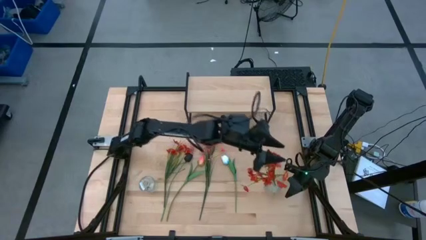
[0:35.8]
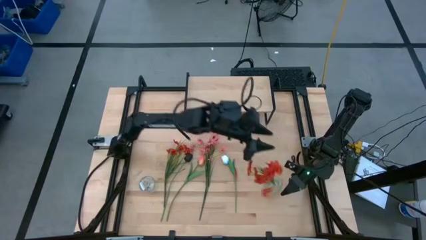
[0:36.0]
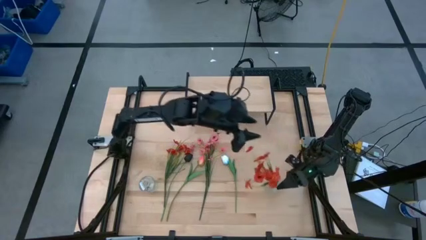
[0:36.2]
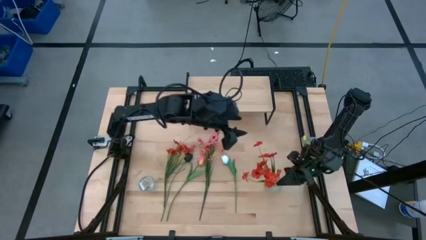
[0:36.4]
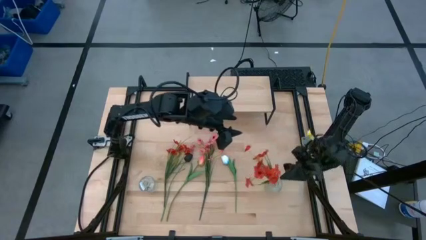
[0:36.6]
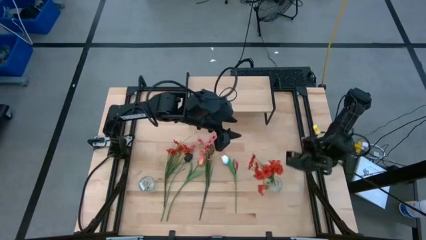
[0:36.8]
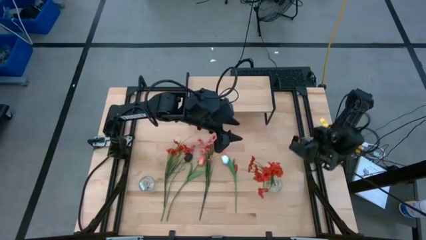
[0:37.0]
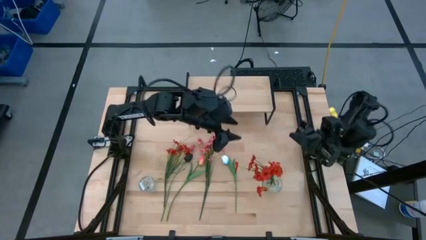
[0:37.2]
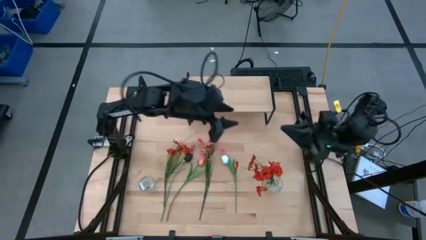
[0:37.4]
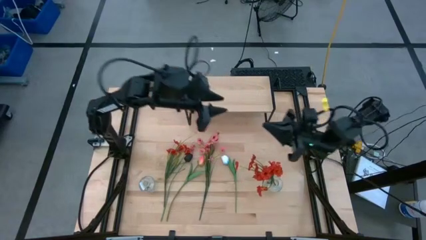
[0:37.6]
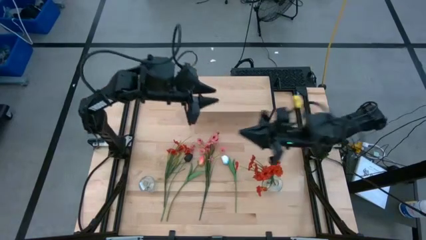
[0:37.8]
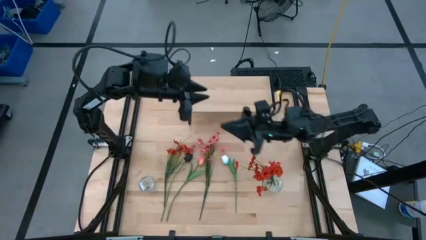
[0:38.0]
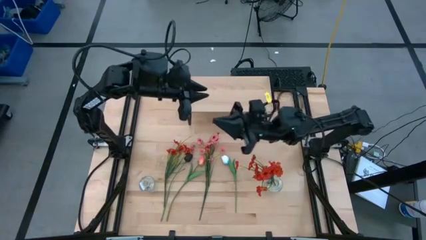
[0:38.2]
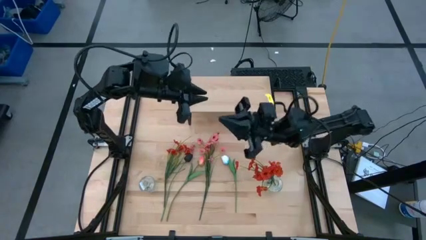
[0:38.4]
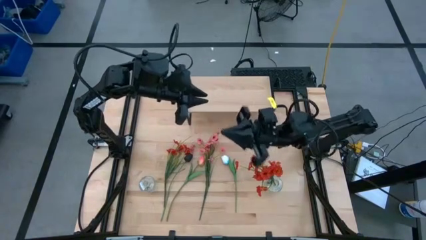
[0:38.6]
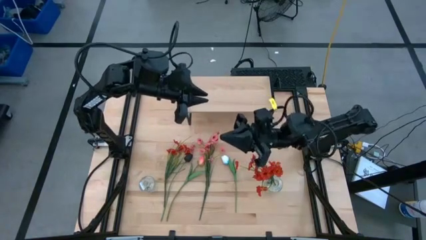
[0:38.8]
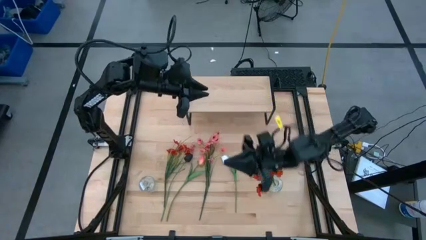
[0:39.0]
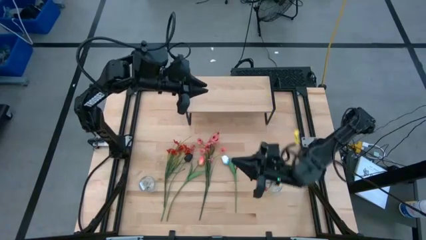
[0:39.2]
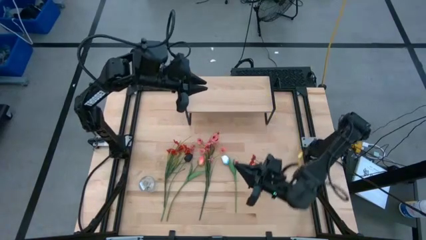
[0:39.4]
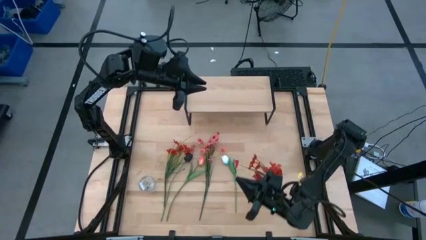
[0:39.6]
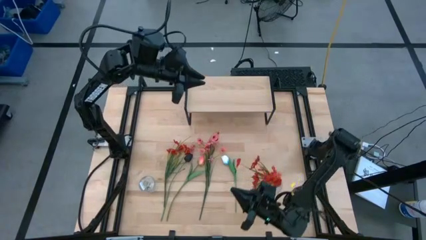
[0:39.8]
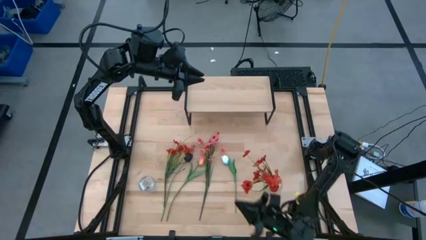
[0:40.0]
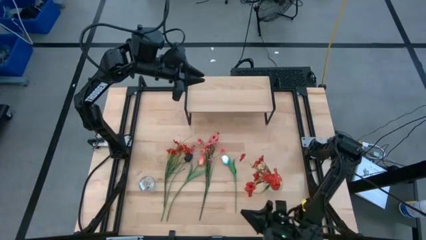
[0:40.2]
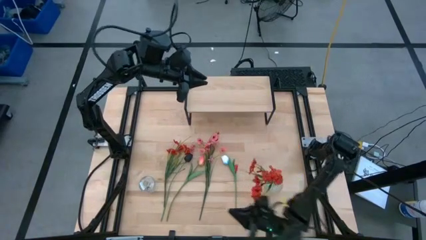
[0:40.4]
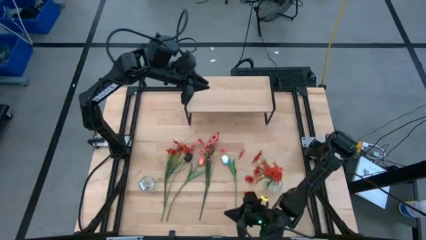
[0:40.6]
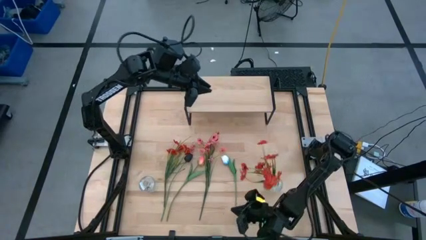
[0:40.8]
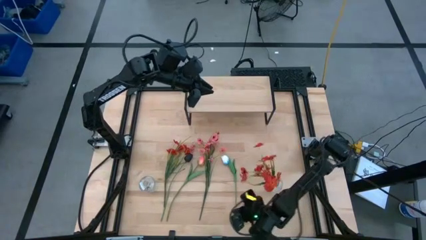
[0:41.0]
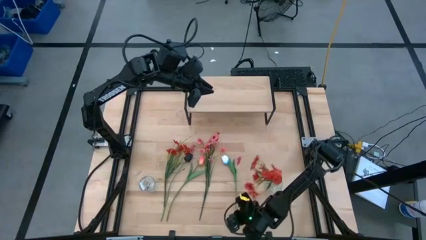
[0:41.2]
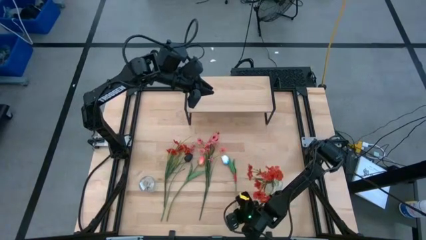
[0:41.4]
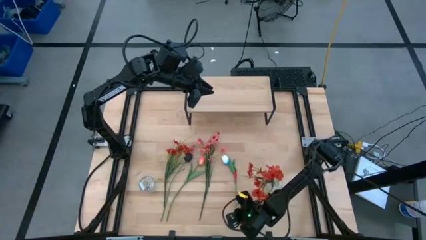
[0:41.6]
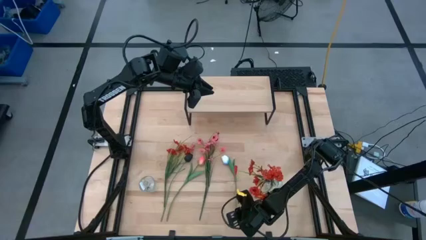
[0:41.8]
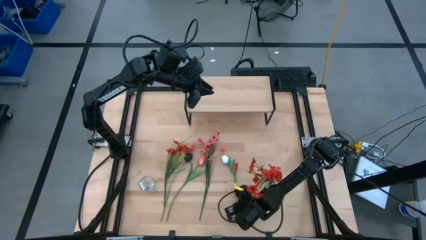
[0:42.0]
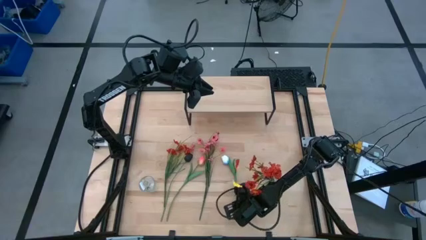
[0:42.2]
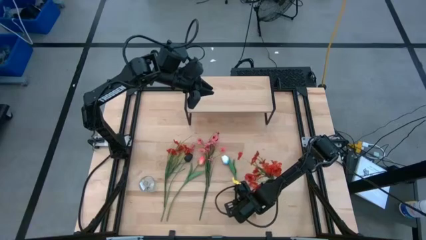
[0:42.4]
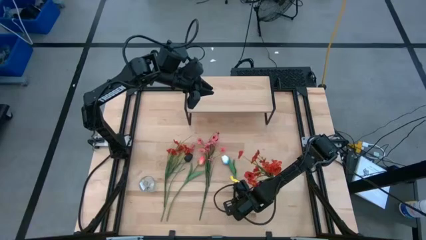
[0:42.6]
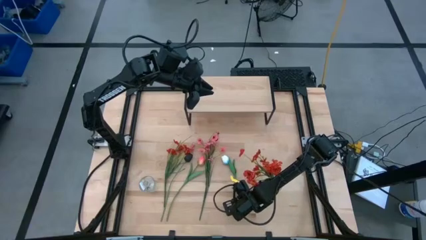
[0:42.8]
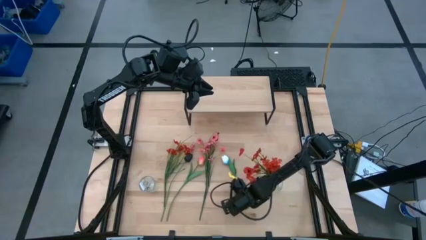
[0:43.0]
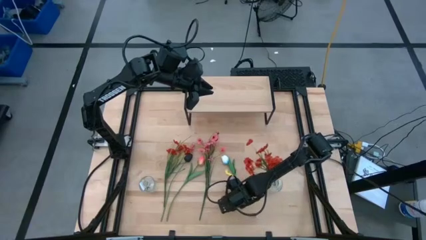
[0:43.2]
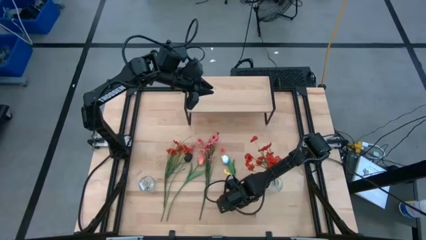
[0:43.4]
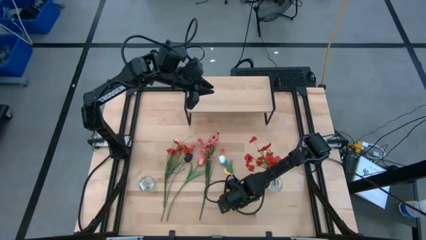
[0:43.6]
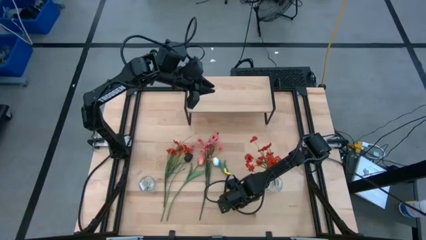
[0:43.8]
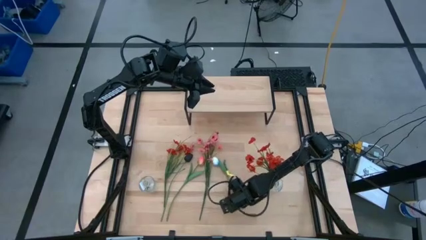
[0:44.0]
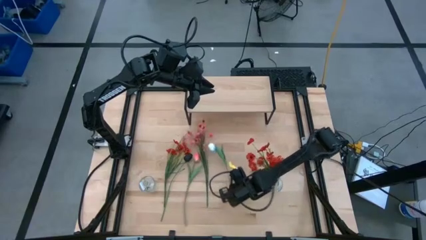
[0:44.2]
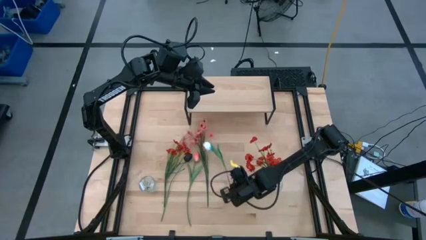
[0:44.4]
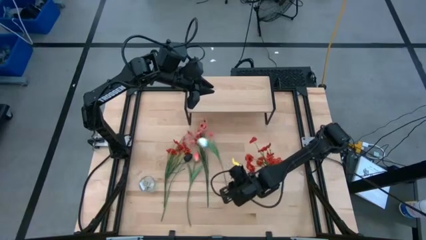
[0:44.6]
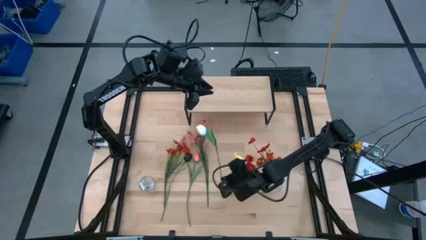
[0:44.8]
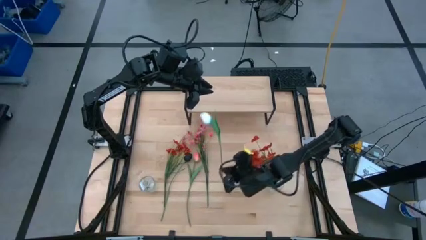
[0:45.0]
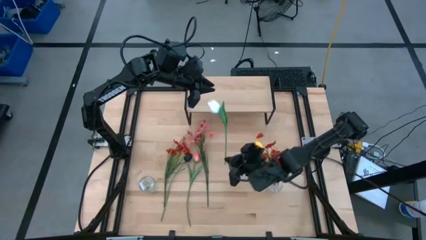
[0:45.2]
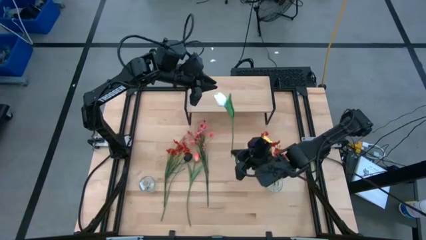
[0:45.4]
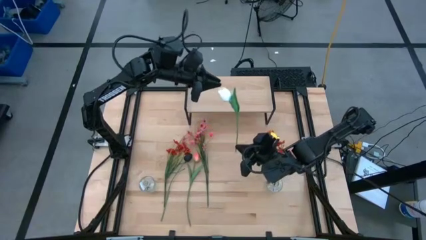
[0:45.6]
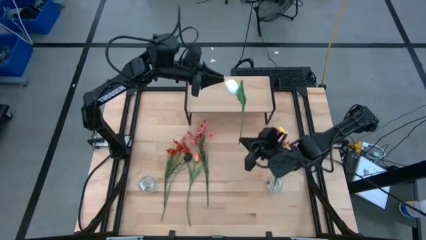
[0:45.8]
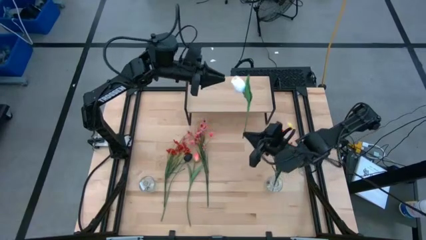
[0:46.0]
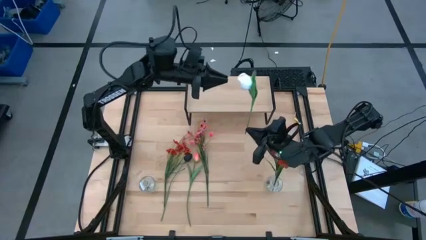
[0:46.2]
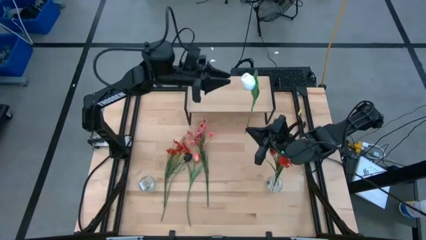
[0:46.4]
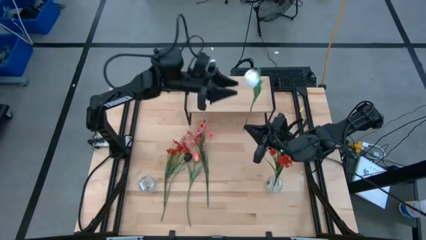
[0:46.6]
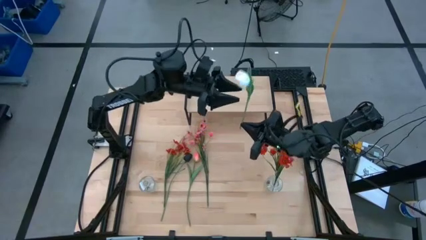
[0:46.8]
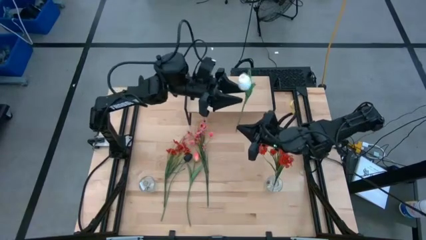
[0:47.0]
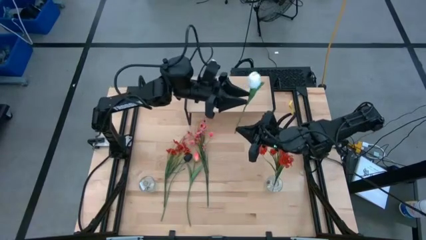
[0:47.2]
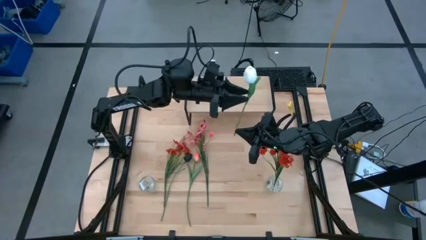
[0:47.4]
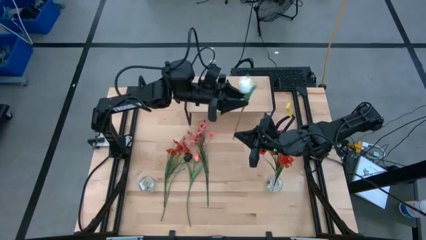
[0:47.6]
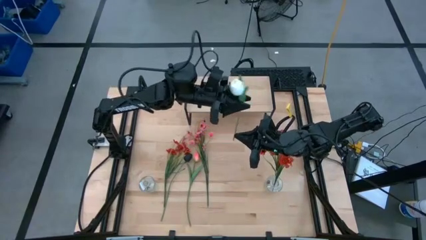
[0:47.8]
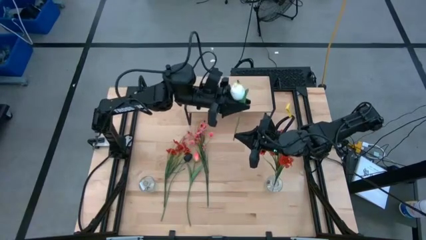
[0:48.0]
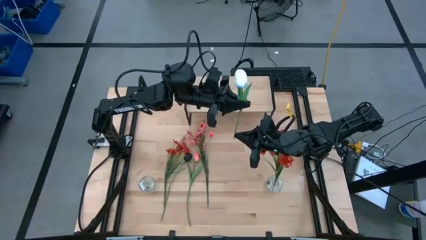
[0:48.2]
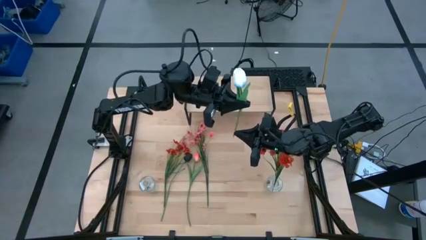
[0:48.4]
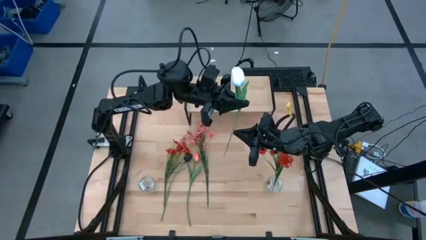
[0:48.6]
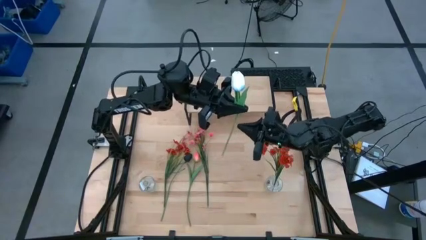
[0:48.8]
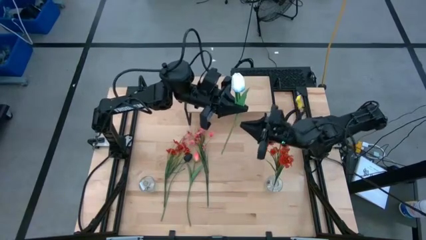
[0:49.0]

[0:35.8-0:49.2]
Task: Pick and place flowers into a vace then onto a shelf
Put the white flower into the right transparent vase

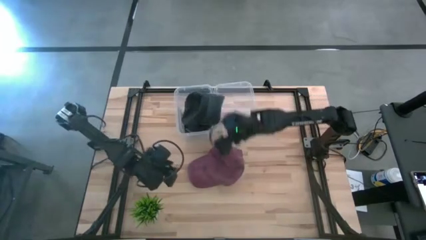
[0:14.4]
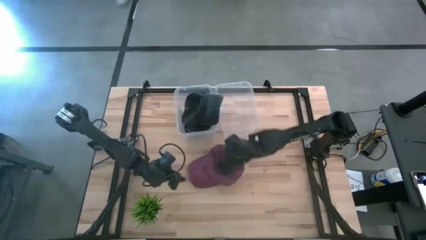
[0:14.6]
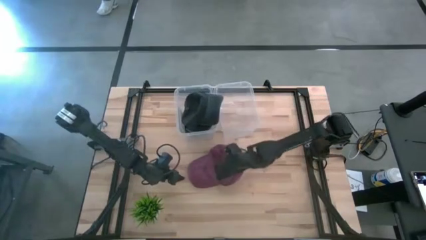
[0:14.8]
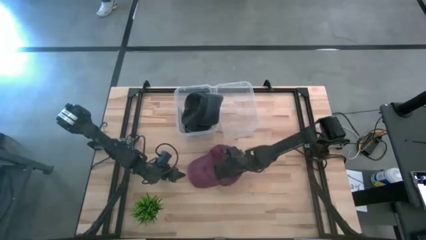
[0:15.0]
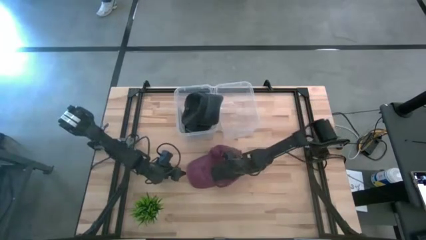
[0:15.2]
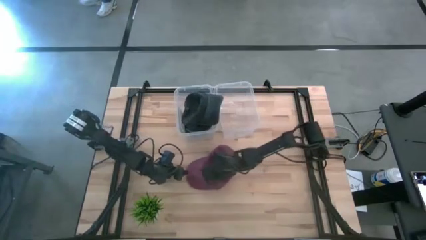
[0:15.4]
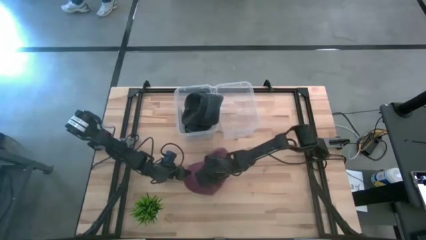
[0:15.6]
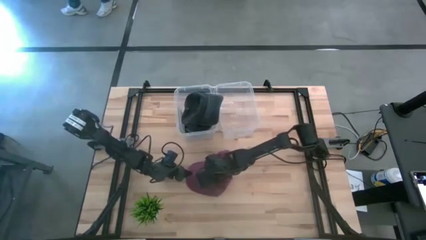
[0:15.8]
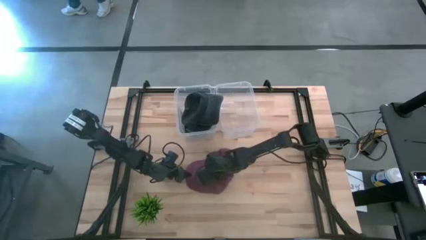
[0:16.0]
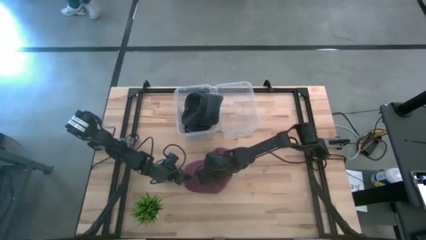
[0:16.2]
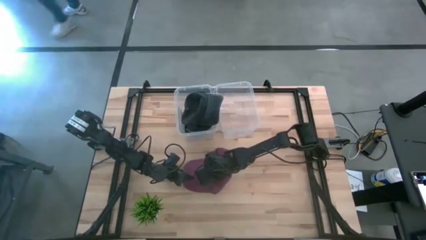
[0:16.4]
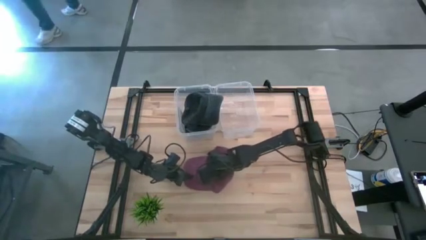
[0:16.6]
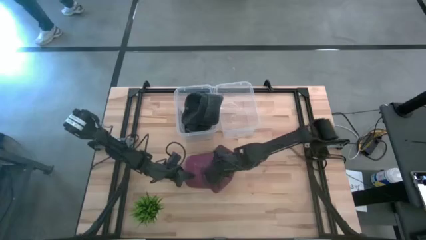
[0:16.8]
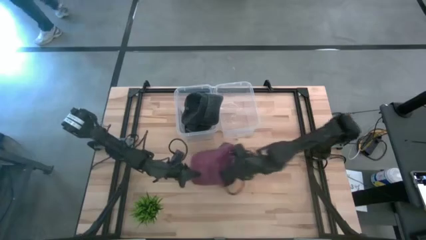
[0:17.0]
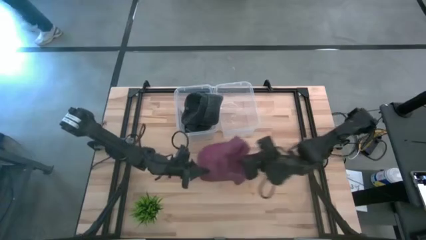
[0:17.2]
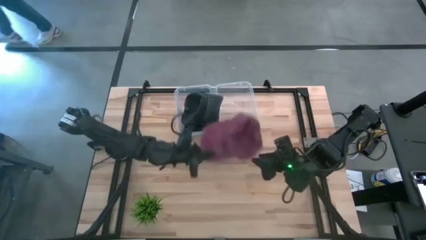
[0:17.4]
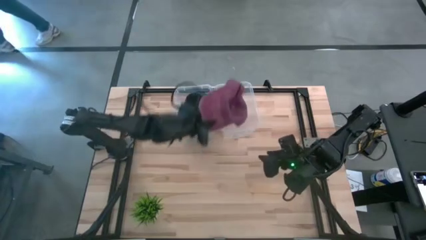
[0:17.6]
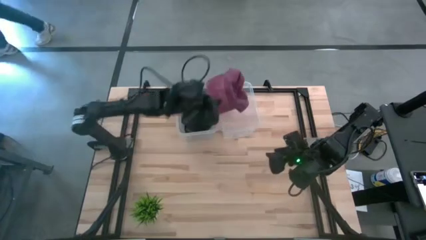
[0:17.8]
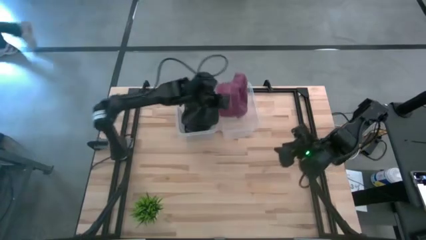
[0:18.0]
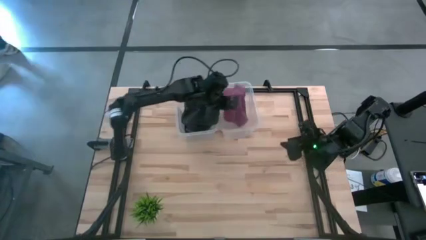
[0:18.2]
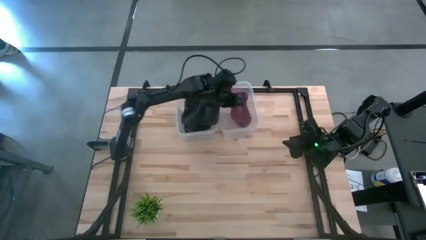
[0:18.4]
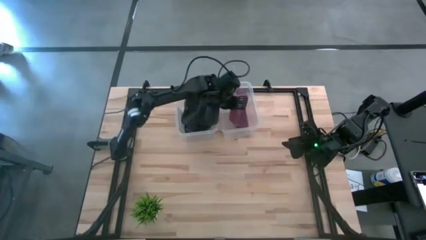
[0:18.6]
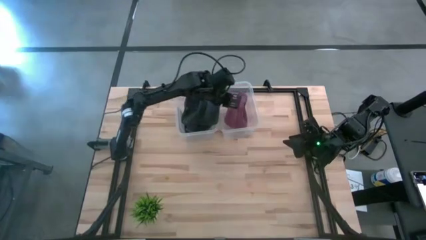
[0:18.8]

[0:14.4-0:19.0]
Task: Pick & Place hat
Put the red cap into the right transparent bin
